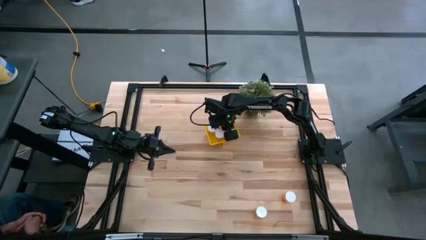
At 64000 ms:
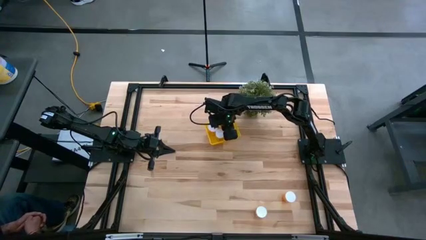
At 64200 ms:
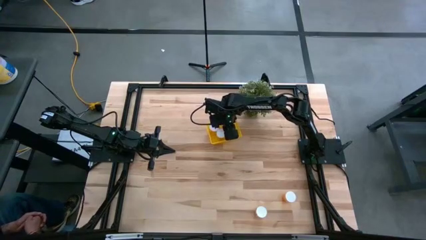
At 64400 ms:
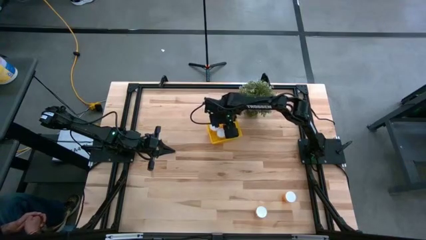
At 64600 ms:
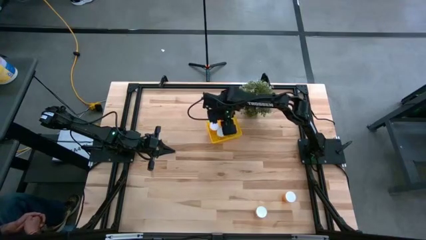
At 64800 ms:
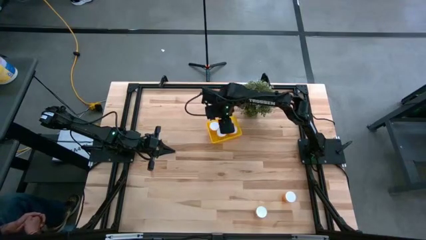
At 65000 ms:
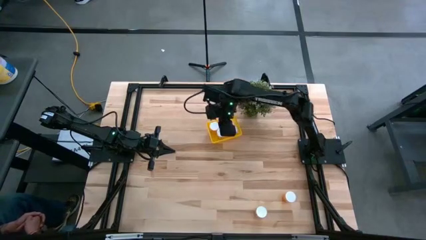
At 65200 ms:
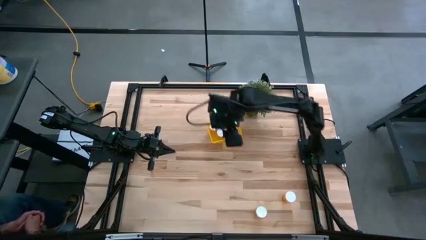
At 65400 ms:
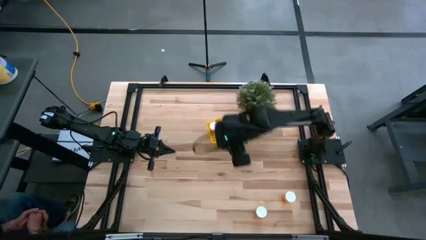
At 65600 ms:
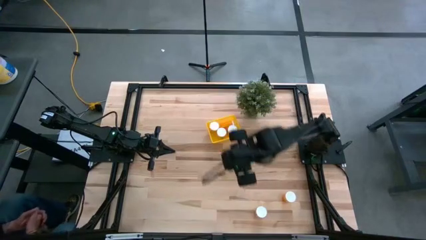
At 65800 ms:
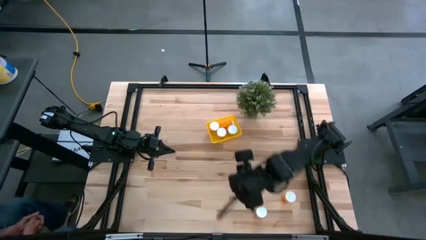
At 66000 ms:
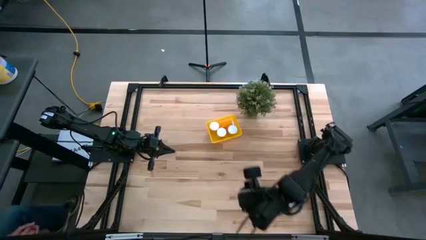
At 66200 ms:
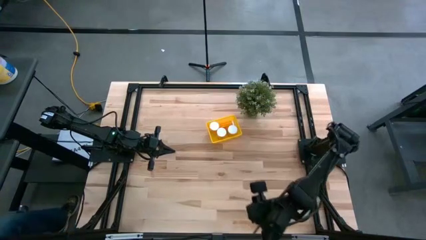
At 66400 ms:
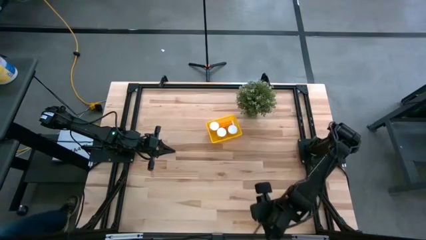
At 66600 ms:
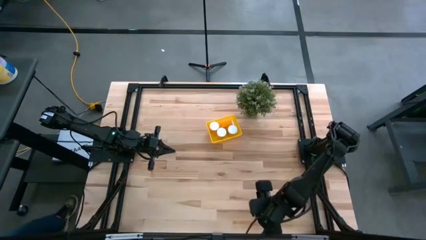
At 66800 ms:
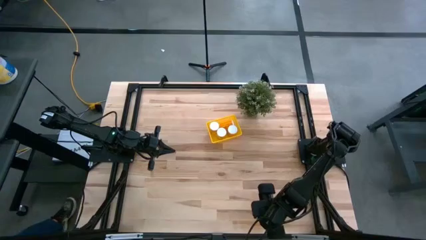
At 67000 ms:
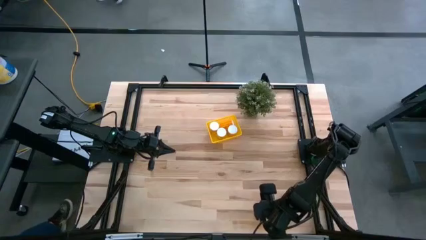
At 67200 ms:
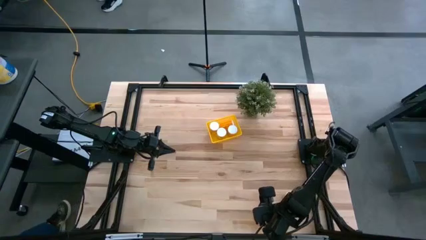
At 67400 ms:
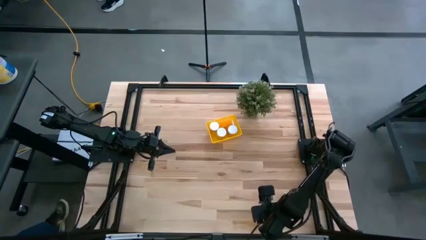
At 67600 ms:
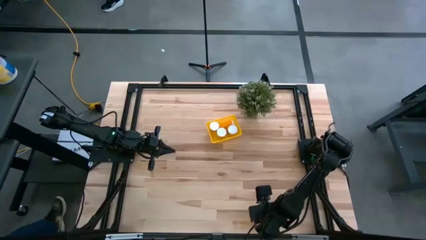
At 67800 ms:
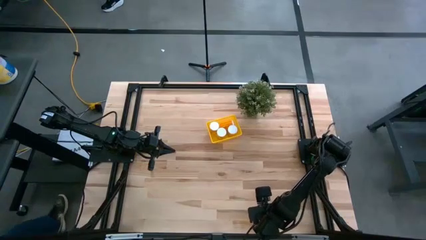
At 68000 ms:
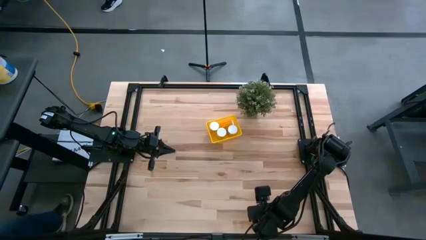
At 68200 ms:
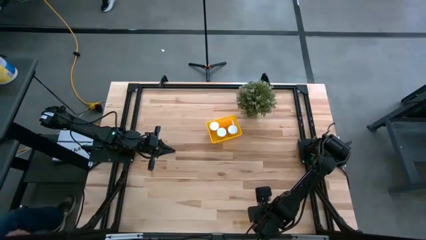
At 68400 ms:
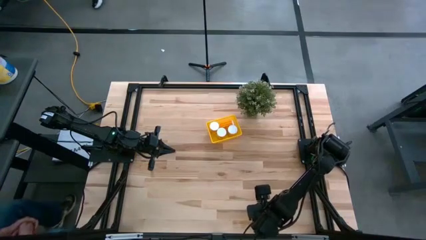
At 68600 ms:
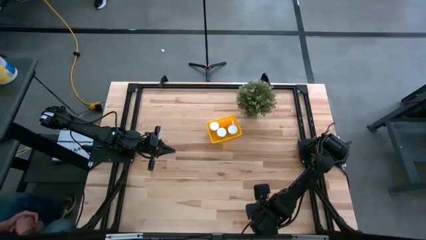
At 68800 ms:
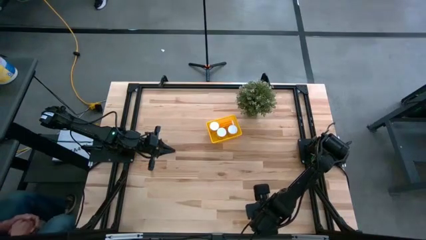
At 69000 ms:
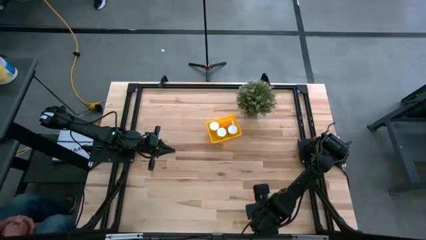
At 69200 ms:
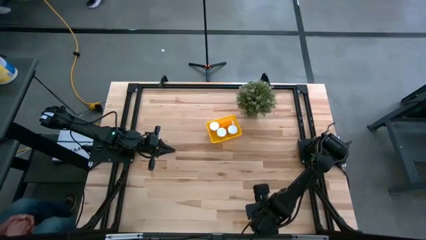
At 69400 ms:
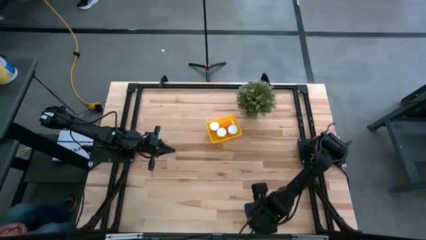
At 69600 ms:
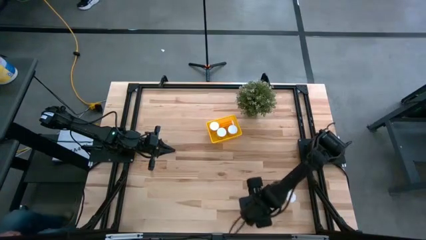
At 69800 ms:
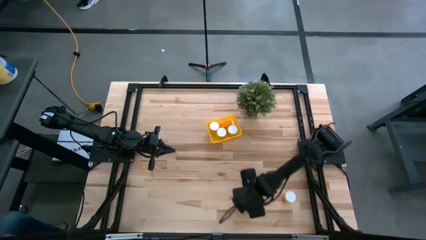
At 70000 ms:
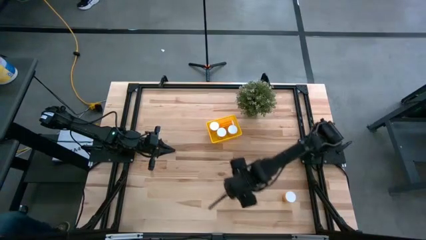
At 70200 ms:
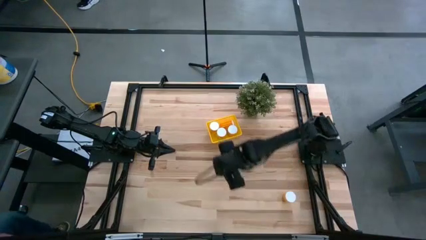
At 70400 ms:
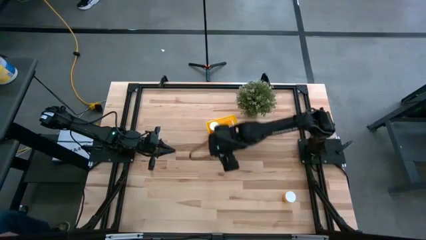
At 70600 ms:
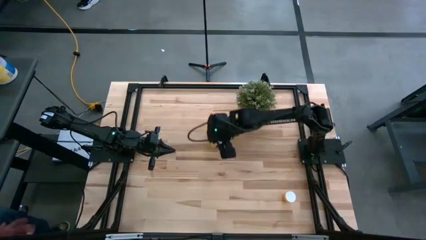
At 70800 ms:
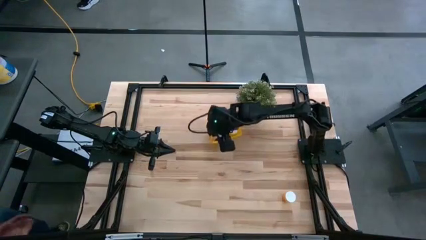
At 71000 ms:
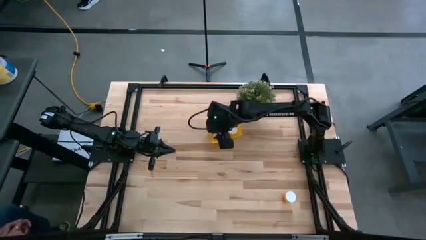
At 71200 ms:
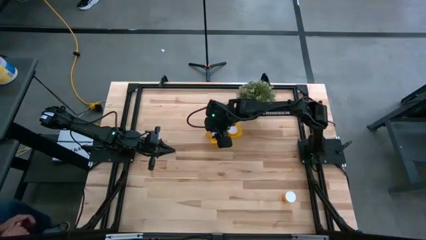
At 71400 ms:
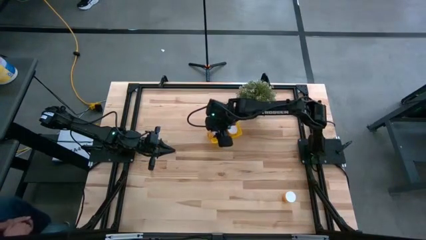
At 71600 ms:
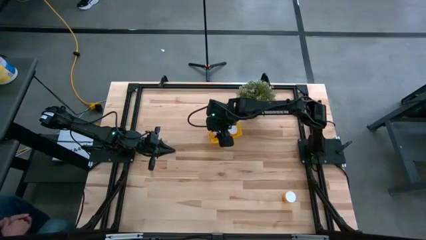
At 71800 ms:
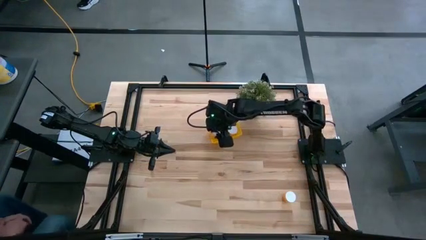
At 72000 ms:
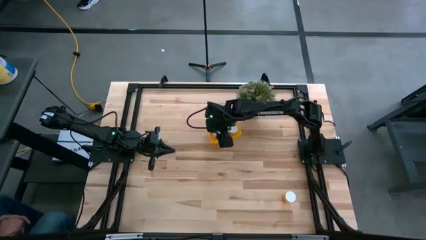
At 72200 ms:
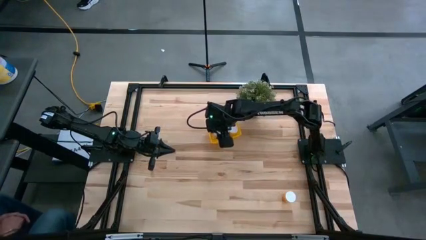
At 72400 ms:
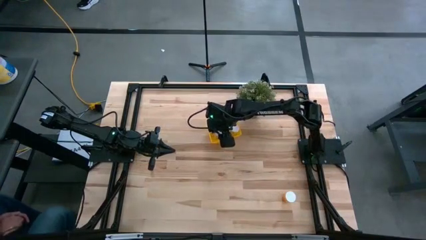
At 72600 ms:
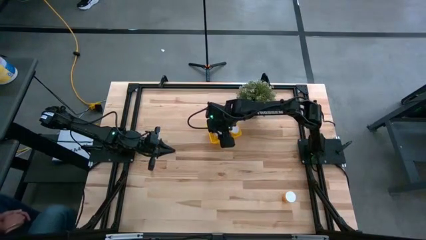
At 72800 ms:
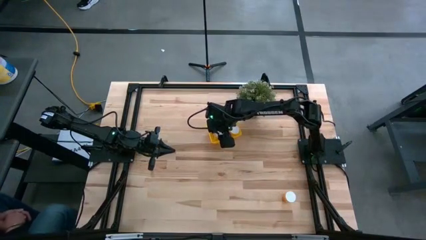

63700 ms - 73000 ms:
Task: Pick and place pill bottles into a basket
Put the orange pill bottle into the yellow bin

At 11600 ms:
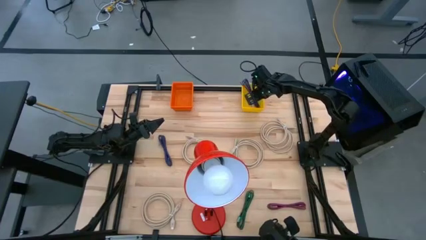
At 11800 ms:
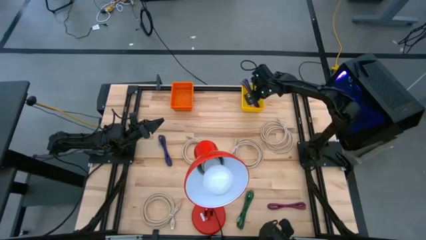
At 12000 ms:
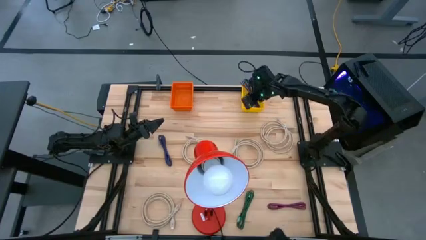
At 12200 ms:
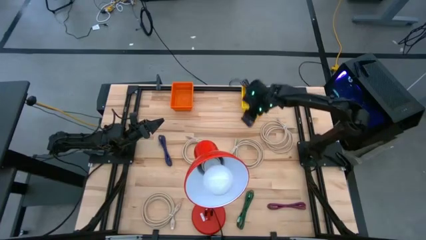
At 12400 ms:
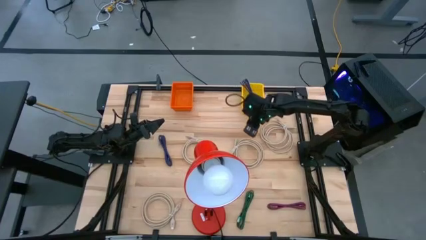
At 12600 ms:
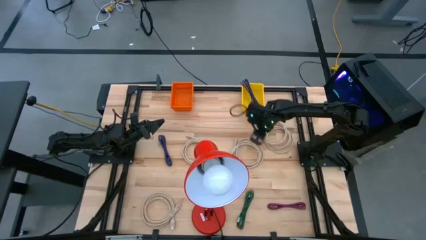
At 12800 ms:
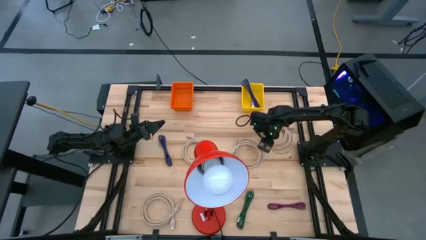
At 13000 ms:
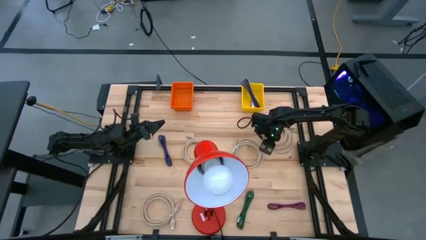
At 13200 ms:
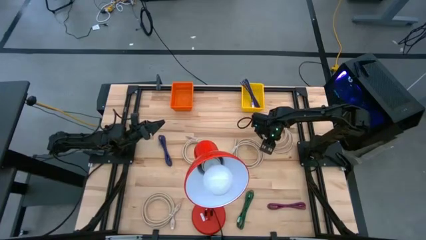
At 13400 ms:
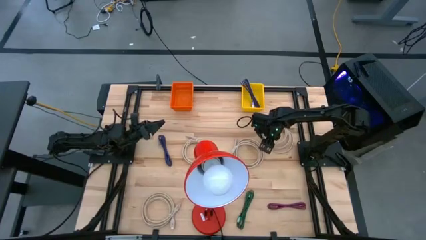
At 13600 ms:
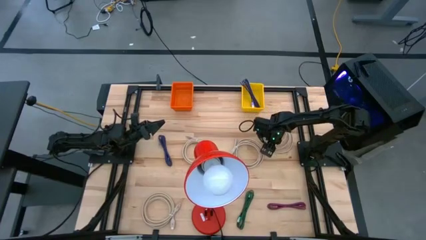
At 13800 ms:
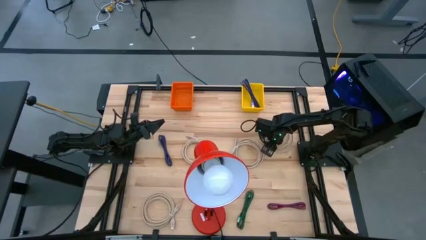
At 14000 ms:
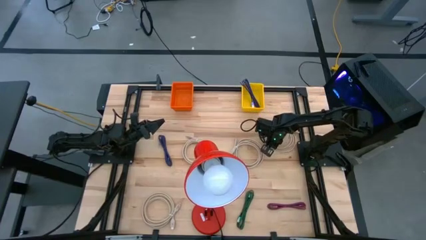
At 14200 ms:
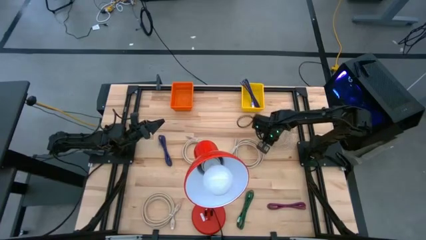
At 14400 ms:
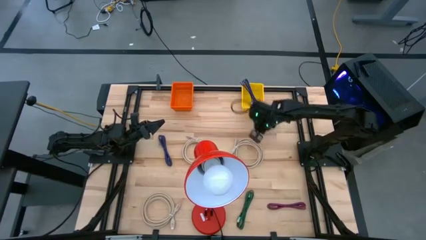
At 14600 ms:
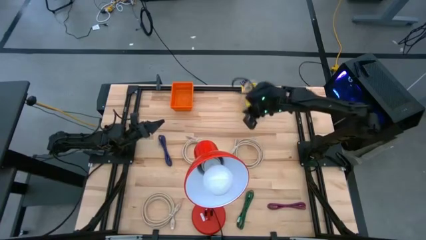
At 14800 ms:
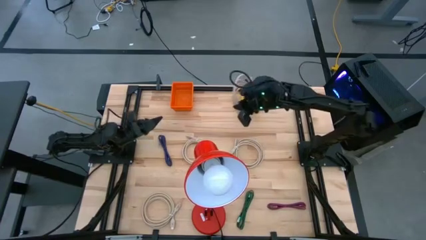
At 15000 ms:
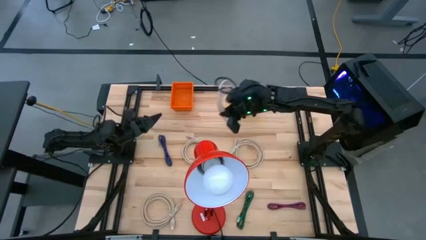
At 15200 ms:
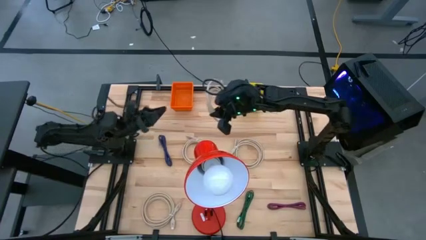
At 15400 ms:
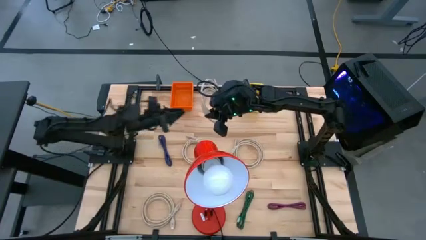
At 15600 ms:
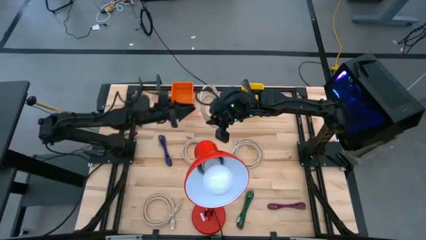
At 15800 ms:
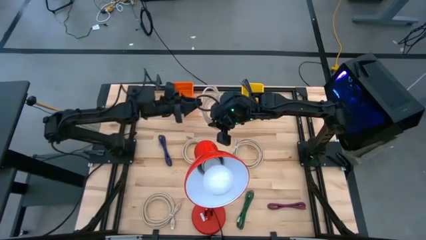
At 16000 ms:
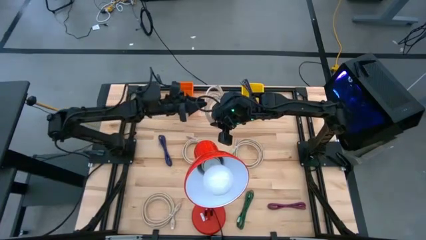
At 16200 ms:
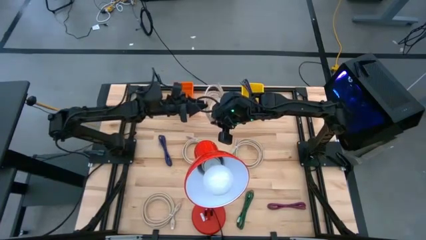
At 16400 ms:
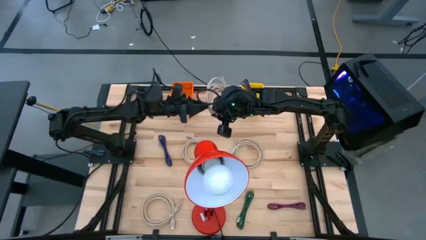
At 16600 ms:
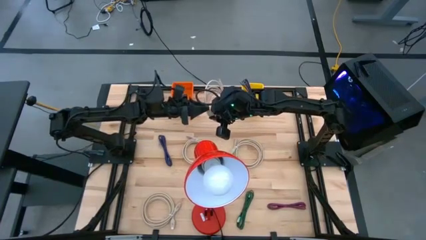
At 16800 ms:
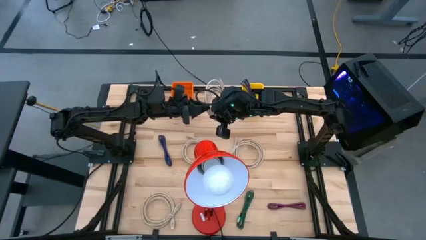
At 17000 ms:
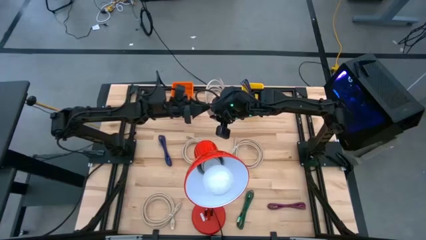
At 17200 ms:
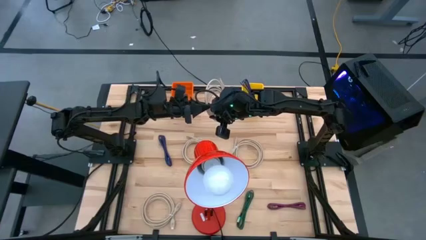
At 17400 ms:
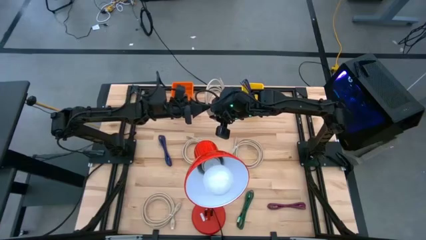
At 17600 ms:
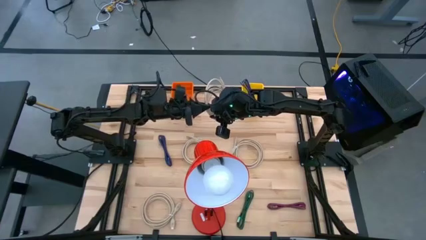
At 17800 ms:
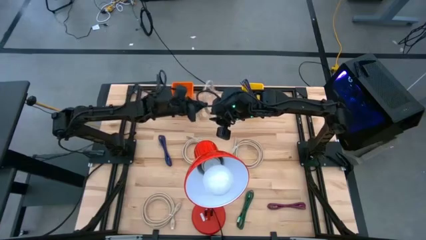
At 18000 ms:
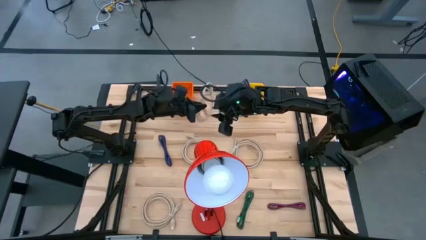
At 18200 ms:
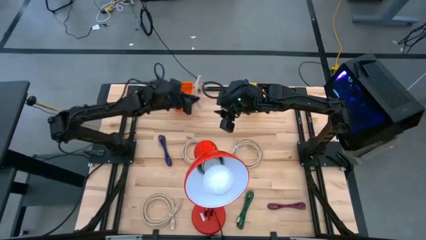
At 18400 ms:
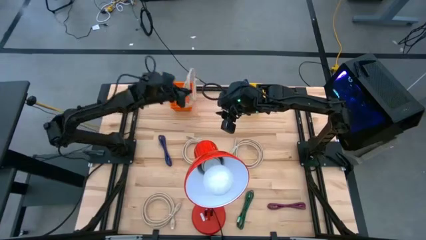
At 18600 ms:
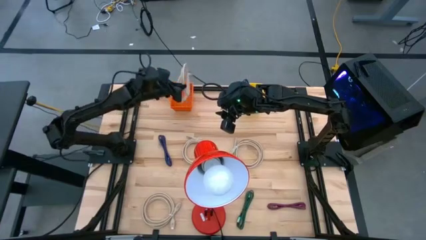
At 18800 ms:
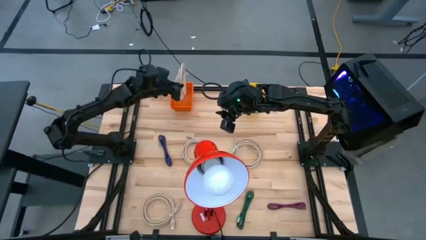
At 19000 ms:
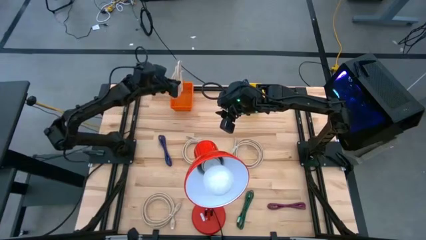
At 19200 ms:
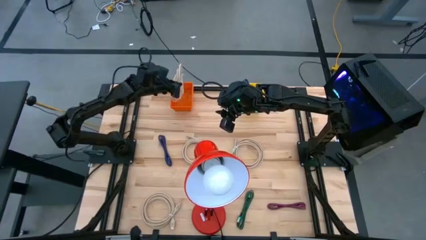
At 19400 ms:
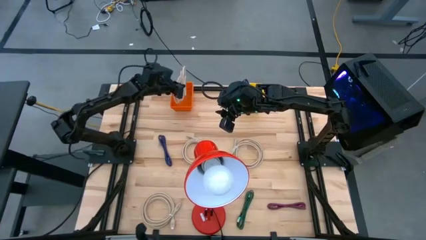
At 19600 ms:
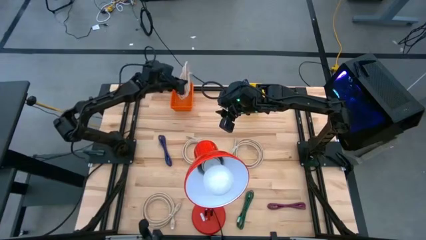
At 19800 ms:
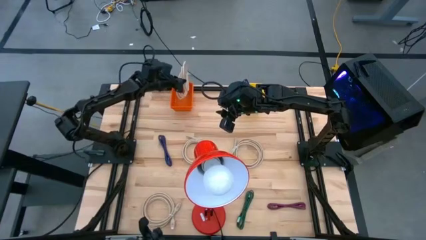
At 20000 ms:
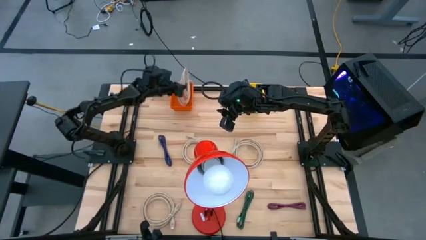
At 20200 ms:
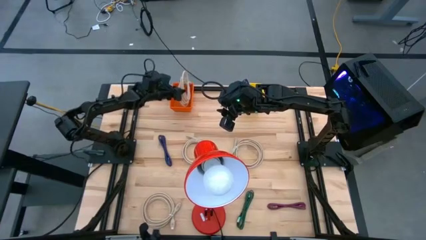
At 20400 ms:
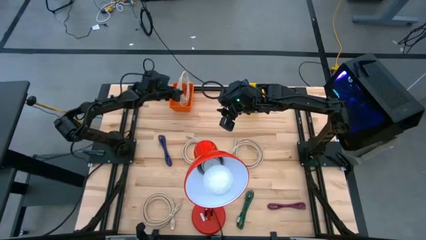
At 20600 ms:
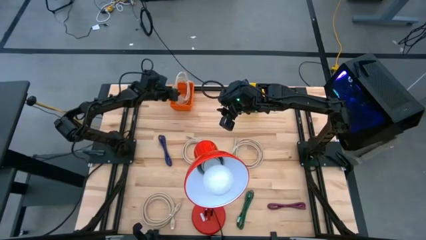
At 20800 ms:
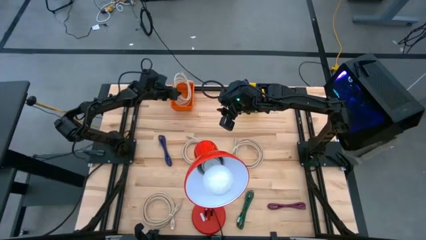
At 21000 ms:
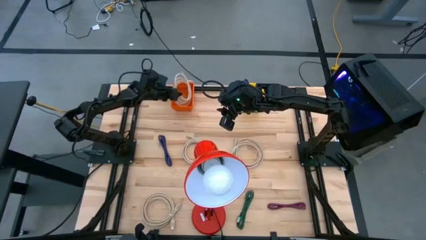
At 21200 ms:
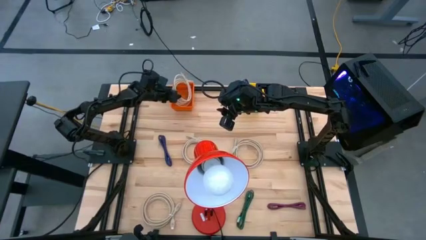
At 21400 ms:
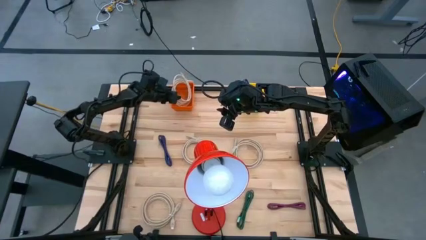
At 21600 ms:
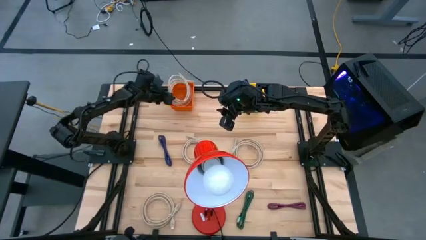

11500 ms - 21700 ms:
Task: Pick & Place USB Port
Put the brown HDMI cable into the orange bin
